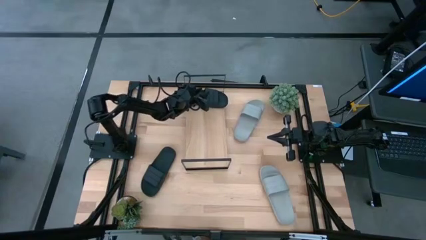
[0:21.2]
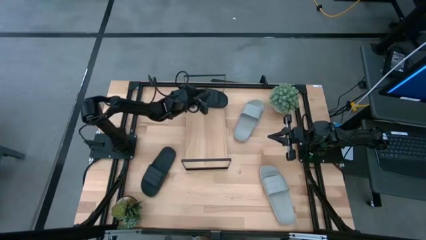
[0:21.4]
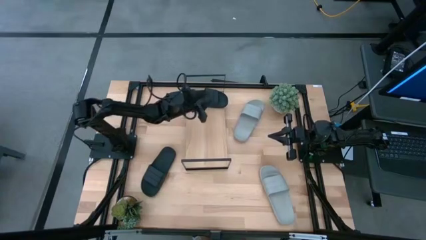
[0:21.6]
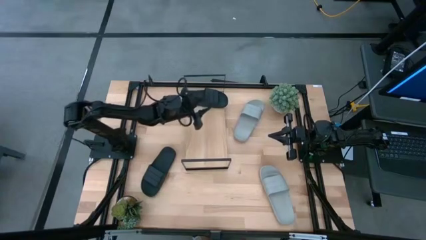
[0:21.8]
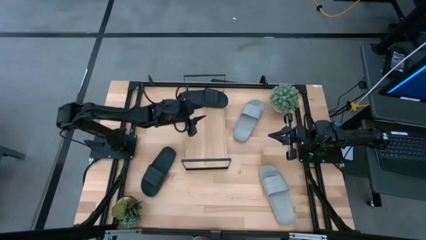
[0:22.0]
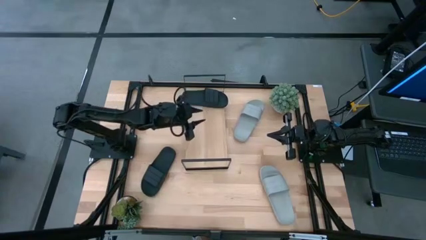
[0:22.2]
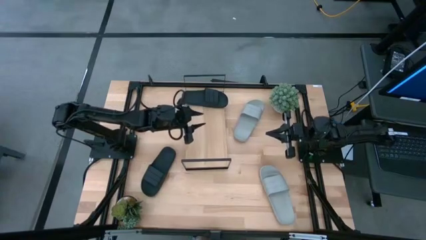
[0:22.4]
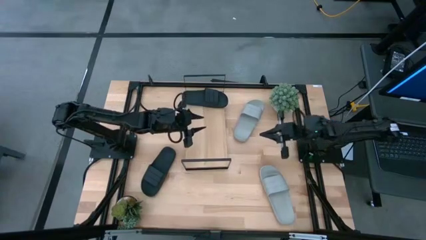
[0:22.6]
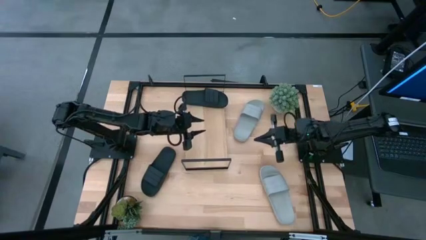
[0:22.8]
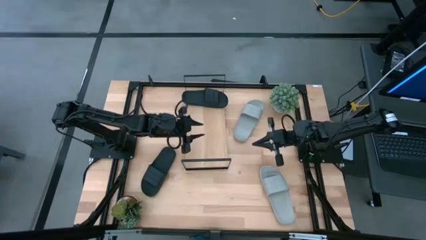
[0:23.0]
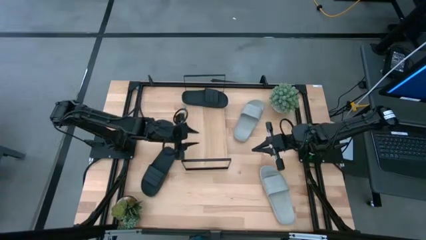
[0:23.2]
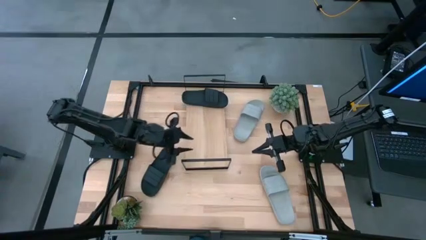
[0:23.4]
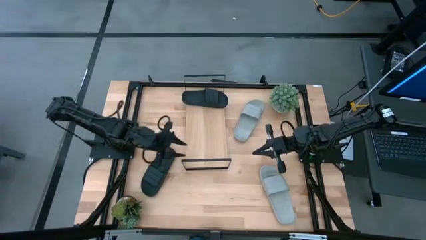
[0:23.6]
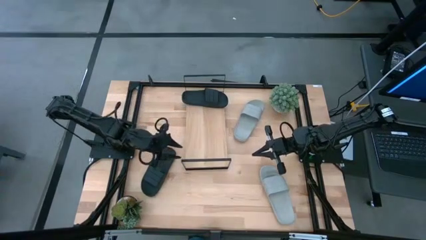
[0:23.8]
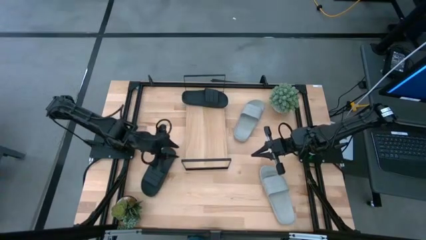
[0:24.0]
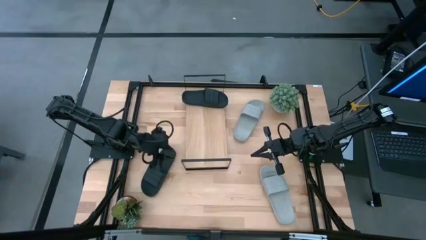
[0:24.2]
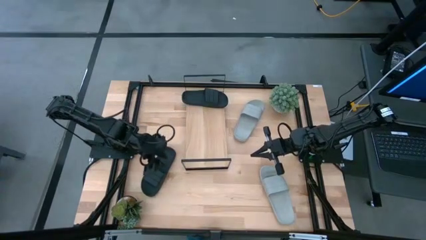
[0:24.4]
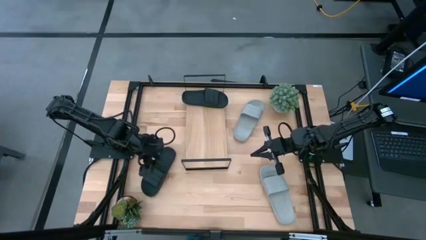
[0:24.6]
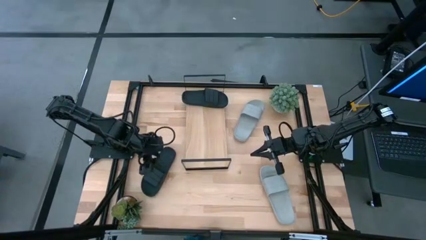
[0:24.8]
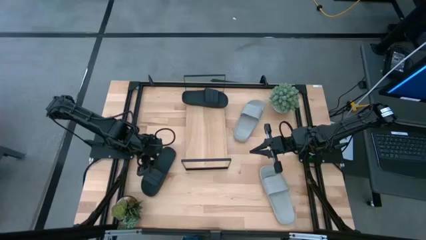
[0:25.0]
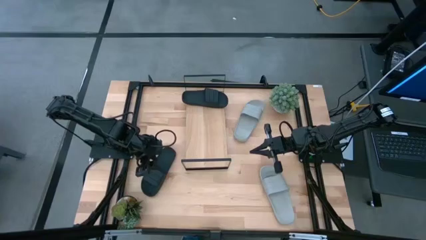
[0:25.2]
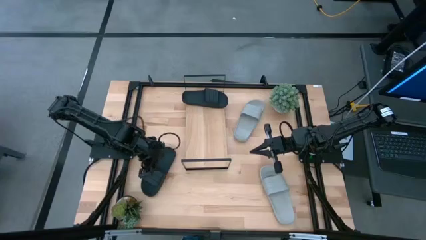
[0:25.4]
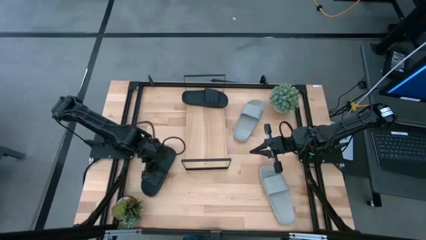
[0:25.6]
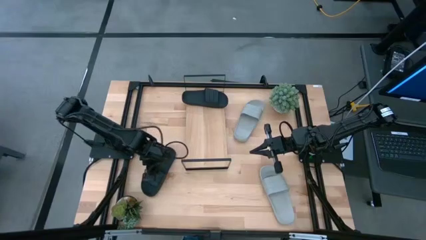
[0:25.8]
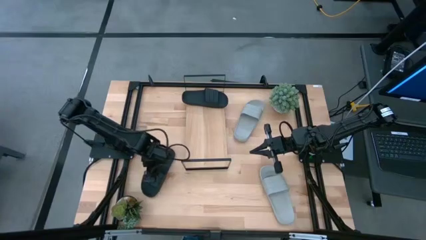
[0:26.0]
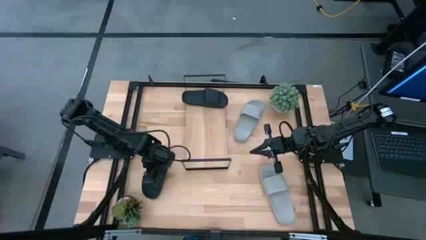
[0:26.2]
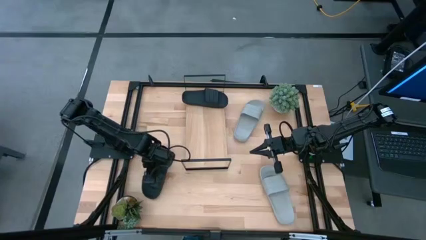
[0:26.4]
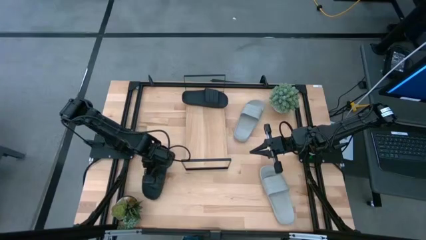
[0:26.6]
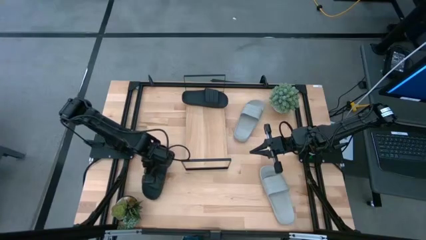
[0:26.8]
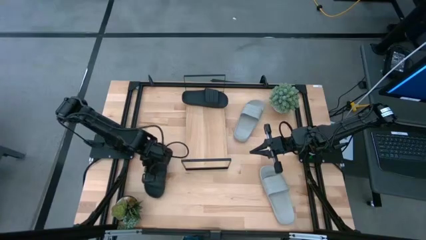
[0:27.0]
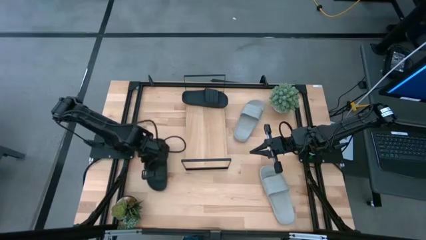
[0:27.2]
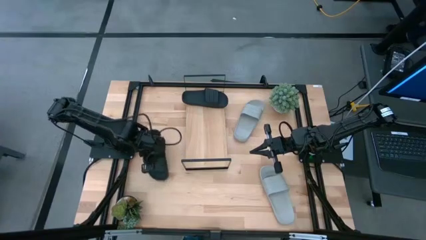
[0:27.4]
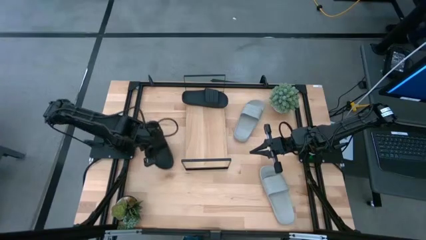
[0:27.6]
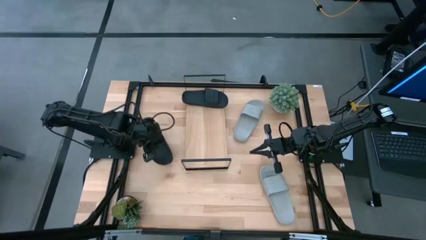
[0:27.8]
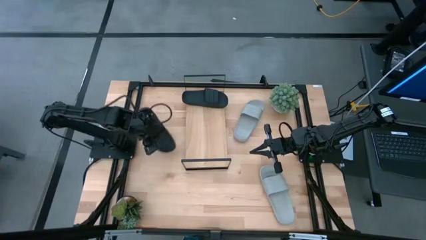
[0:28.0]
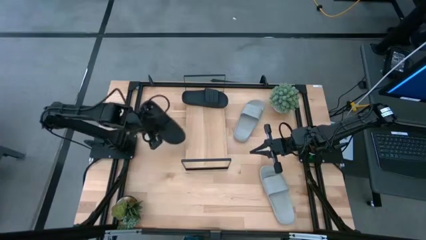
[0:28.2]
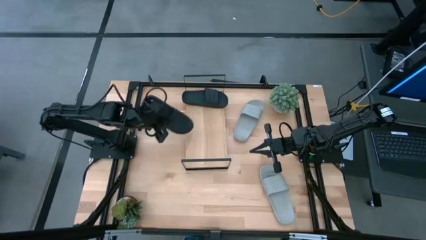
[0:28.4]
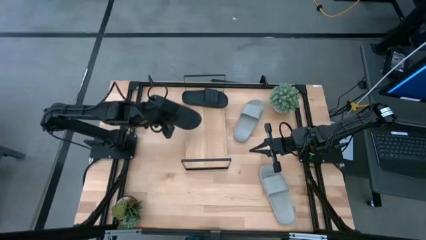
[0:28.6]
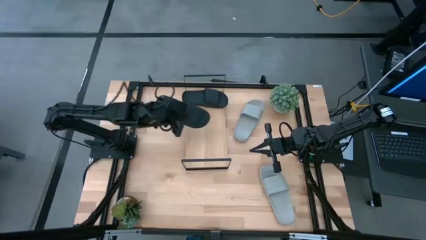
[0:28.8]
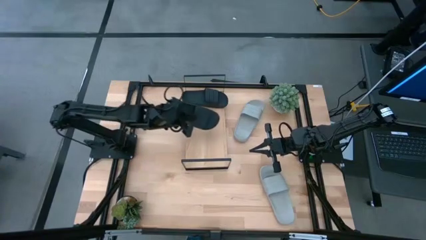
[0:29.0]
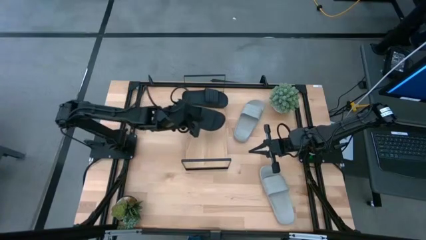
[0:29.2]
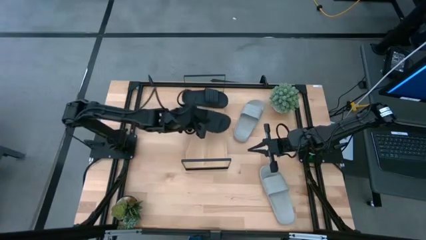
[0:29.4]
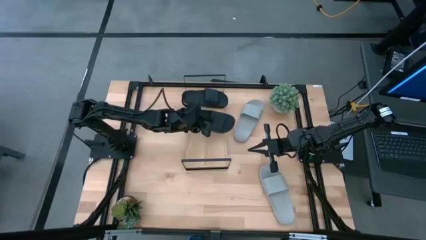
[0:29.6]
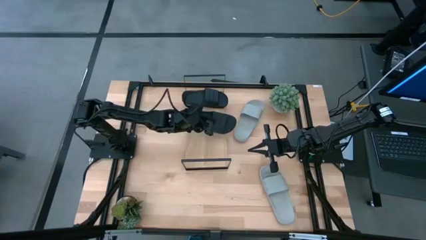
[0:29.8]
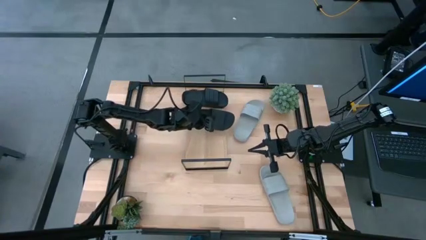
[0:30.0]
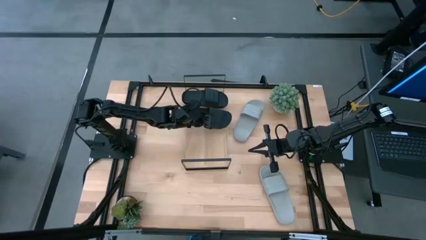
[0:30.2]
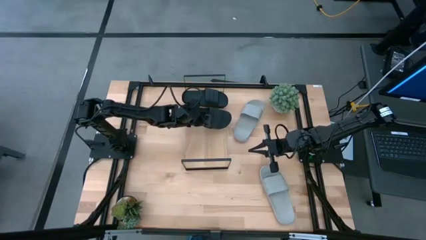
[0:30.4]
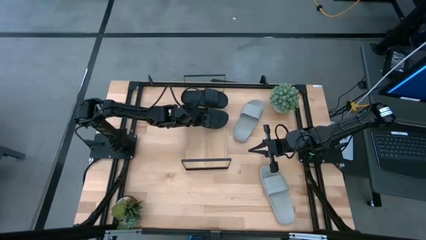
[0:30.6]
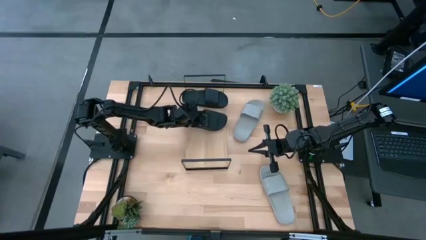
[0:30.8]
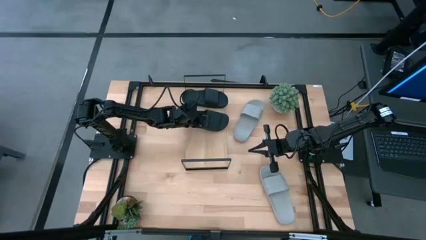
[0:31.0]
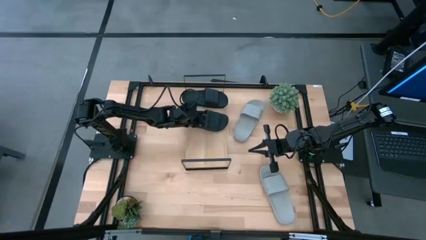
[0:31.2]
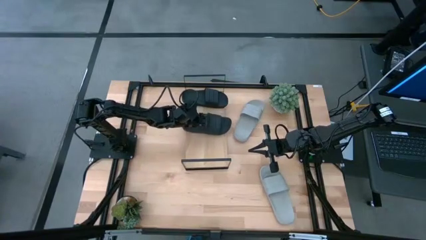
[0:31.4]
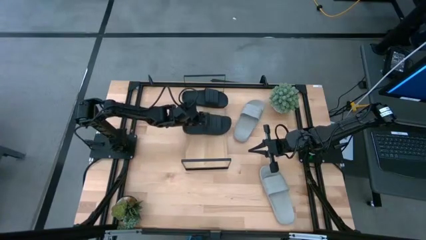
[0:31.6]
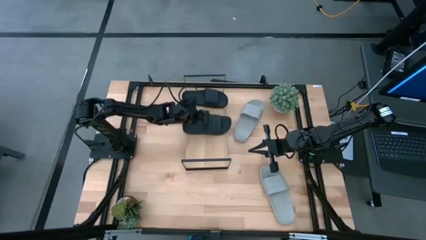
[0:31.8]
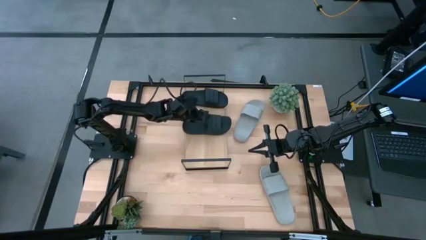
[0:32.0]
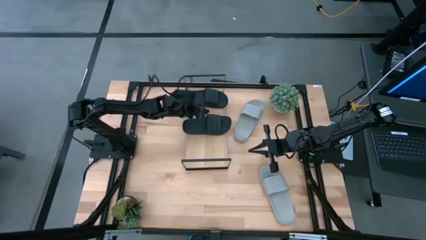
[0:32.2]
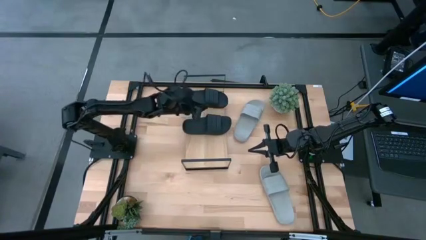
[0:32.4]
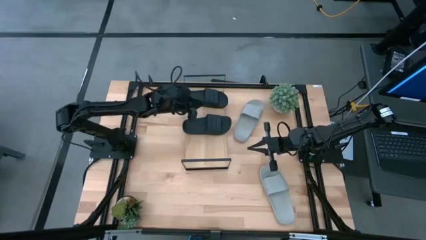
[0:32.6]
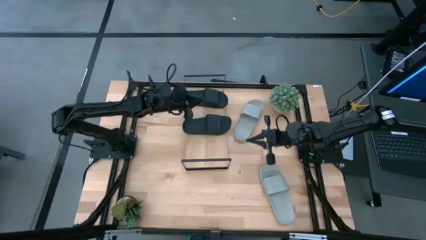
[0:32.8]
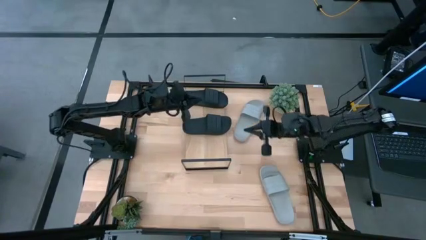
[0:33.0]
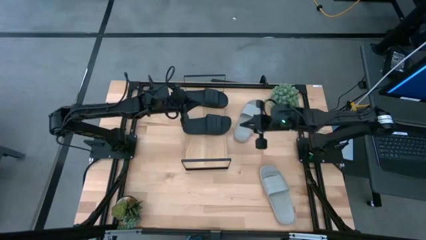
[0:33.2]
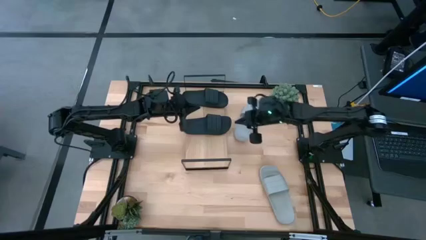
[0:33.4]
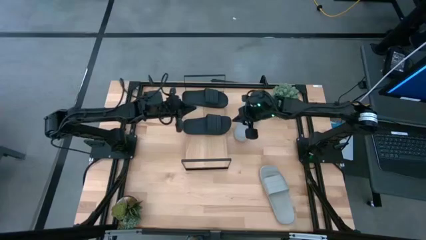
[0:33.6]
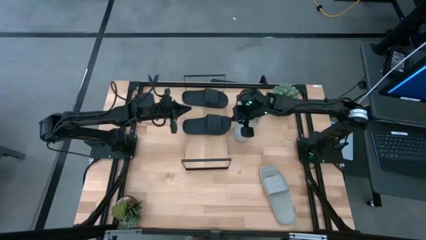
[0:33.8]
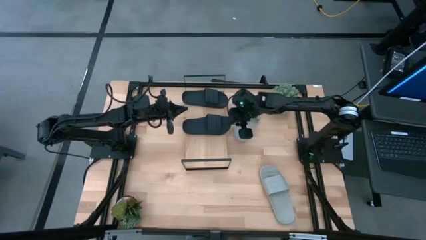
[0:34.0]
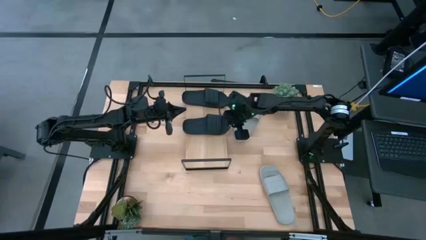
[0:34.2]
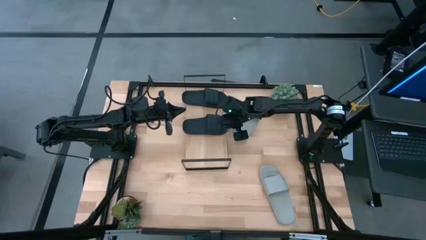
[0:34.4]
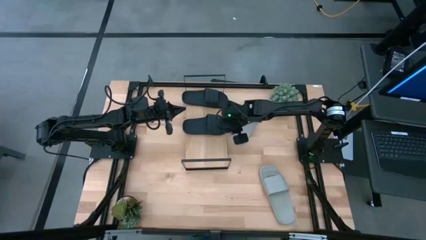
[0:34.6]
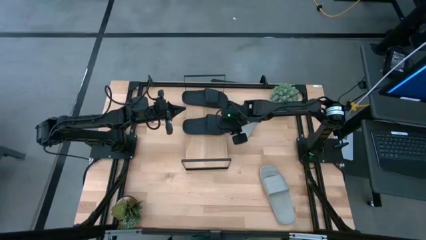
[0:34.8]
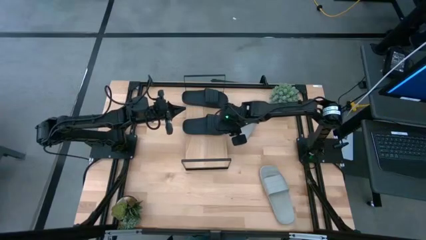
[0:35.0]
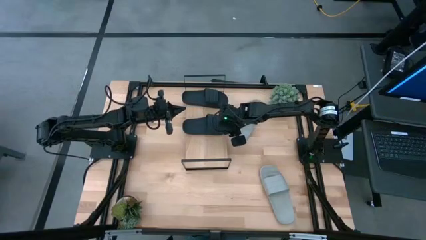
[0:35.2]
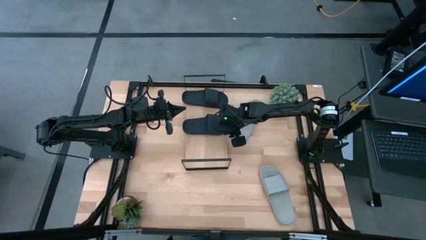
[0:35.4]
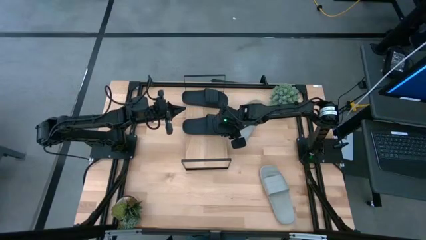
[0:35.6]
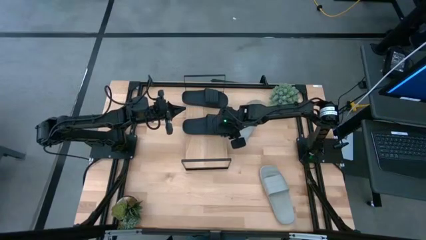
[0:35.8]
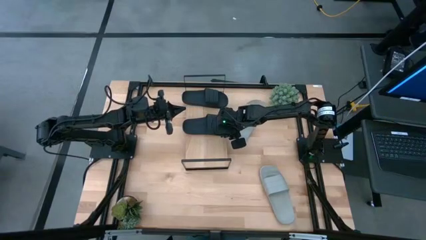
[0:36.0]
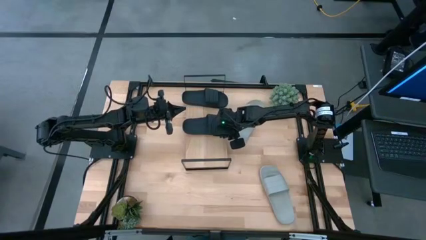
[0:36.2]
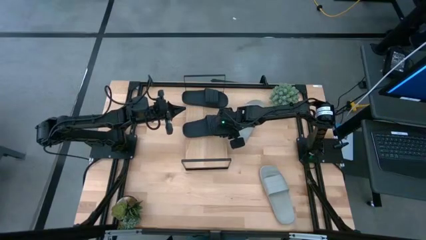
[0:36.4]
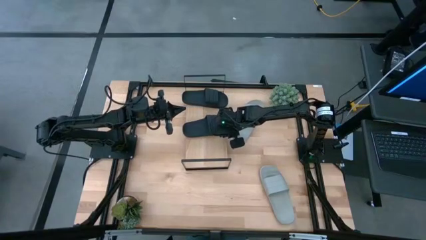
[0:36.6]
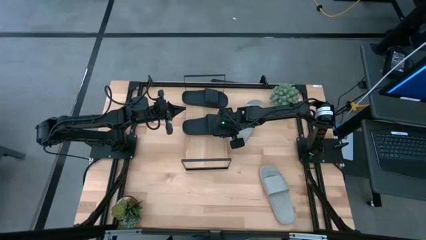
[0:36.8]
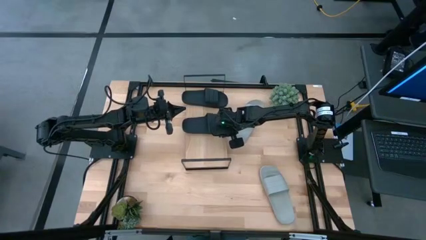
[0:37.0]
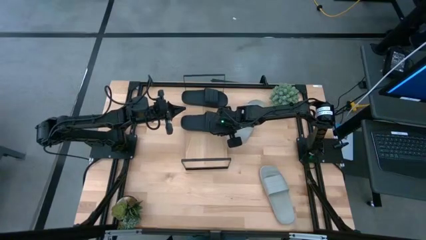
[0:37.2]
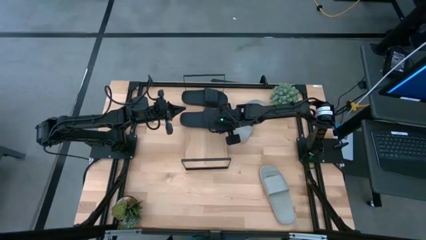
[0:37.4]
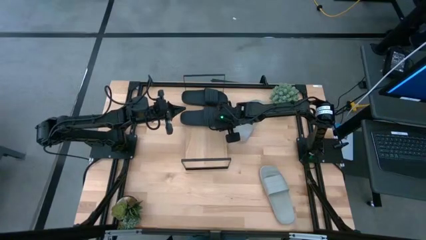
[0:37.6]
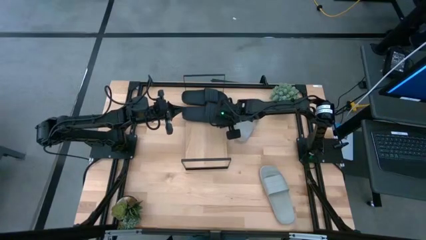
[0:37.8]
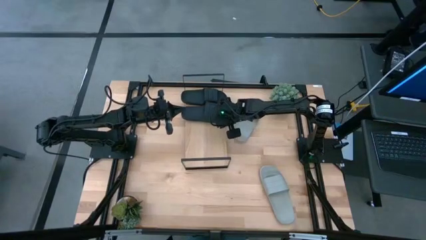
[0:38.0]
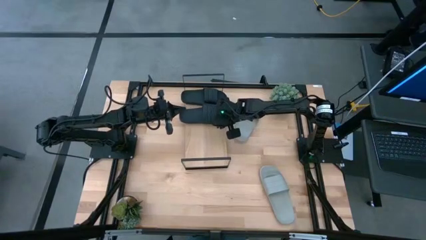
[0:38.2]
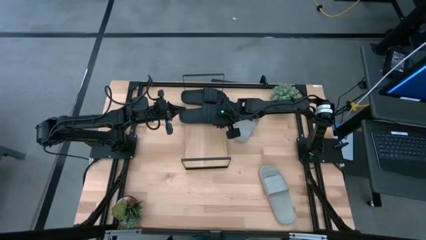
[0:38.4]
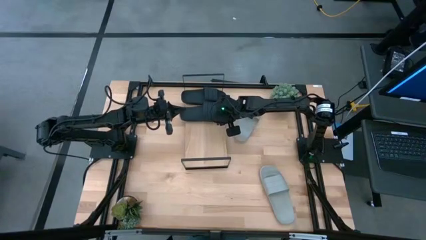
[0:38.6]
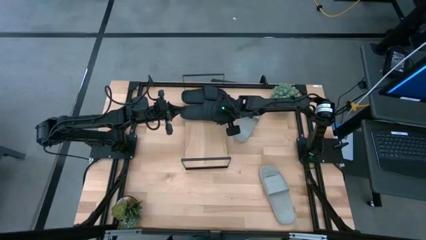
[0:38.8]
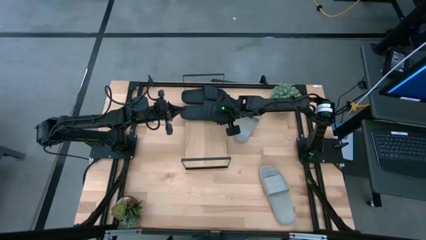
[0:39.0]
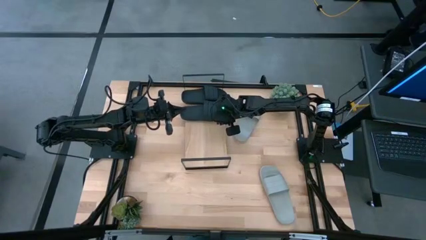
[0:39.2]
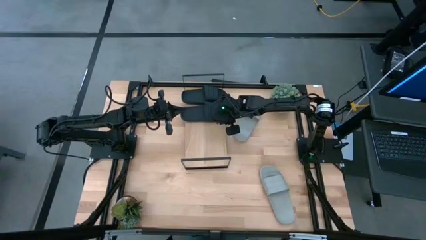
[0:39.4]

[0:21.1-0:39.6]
Task: Pick and place slides into the shelf
Put the black slides on the shelf
